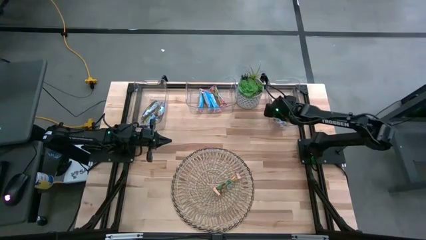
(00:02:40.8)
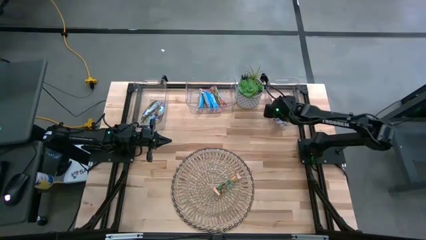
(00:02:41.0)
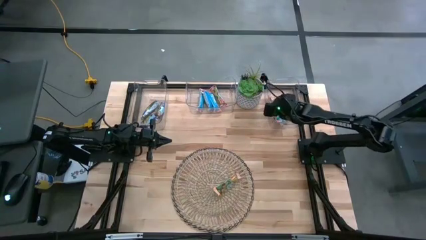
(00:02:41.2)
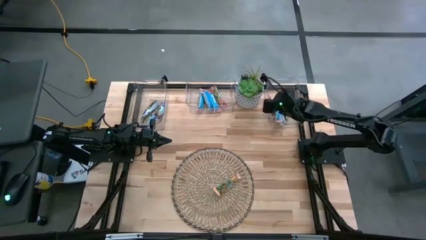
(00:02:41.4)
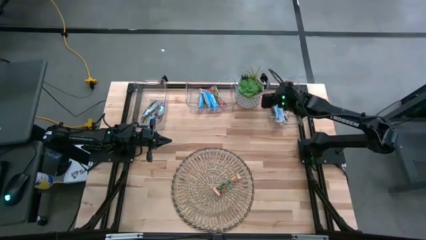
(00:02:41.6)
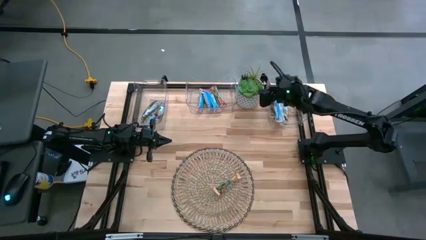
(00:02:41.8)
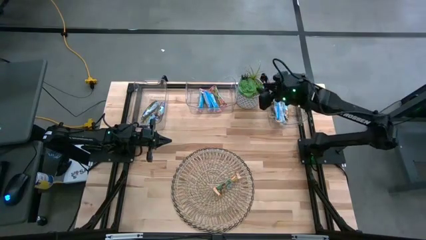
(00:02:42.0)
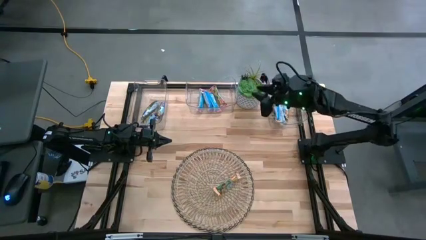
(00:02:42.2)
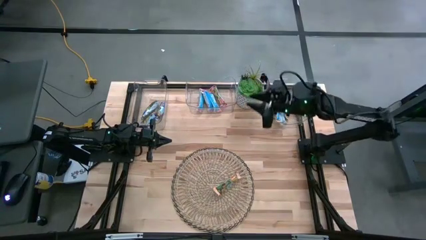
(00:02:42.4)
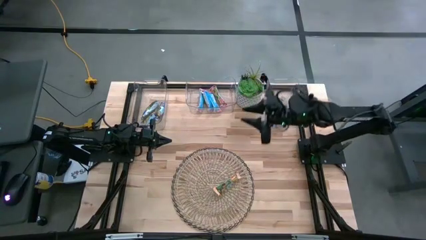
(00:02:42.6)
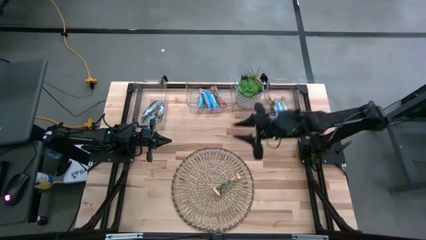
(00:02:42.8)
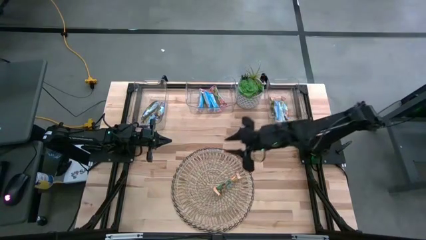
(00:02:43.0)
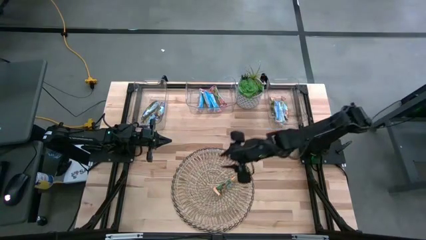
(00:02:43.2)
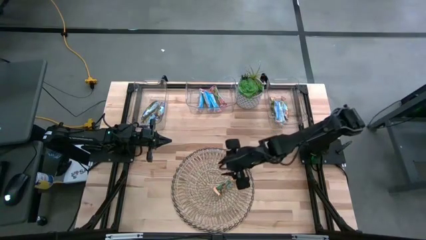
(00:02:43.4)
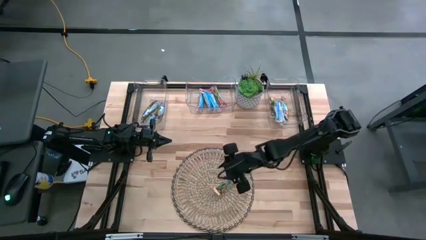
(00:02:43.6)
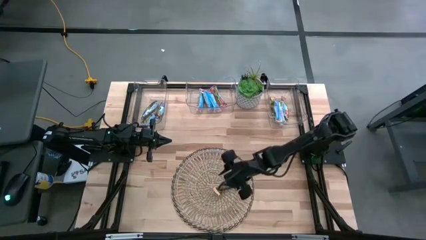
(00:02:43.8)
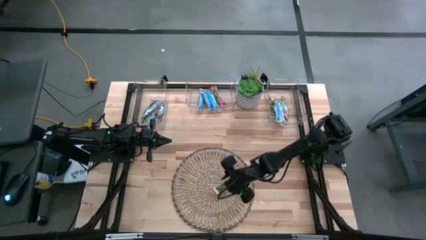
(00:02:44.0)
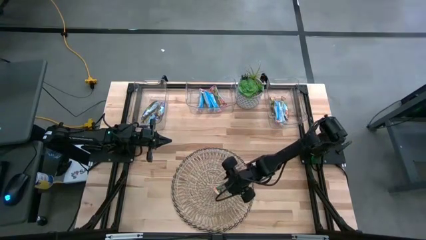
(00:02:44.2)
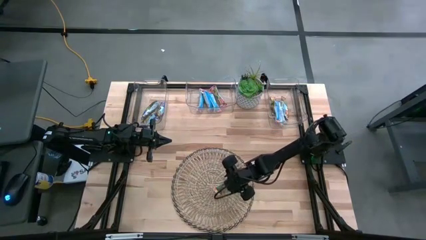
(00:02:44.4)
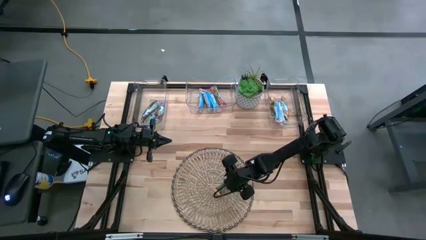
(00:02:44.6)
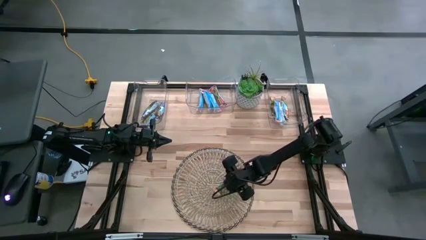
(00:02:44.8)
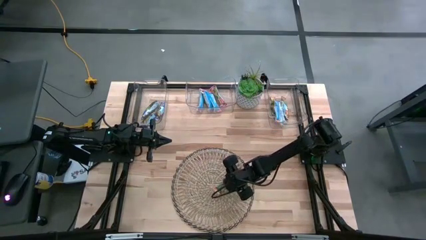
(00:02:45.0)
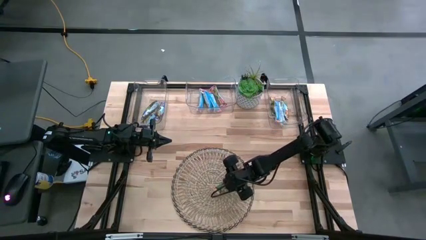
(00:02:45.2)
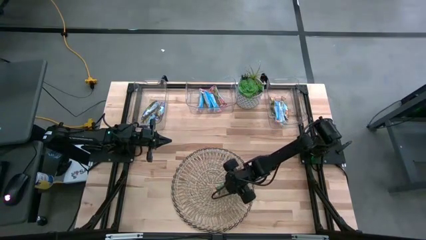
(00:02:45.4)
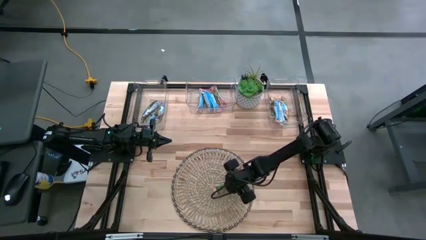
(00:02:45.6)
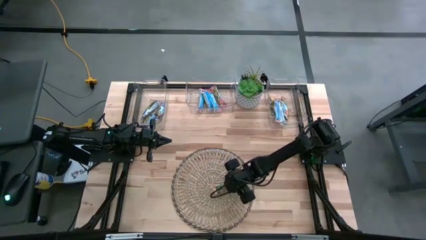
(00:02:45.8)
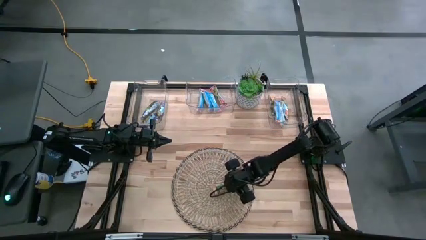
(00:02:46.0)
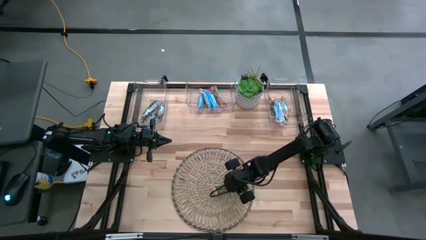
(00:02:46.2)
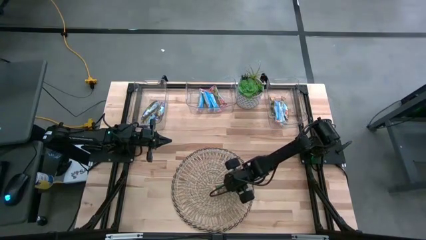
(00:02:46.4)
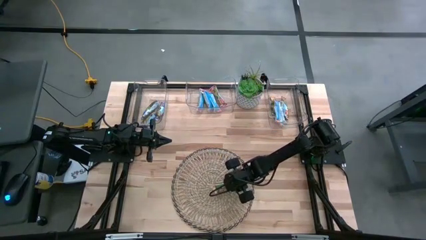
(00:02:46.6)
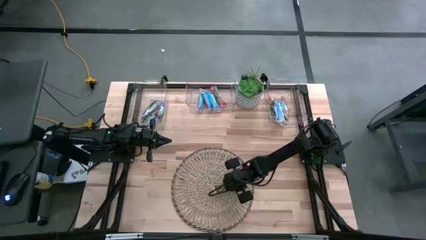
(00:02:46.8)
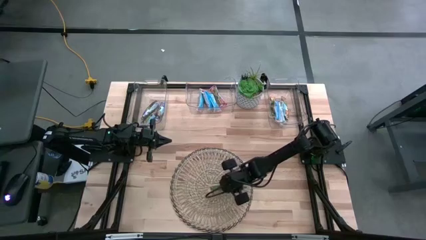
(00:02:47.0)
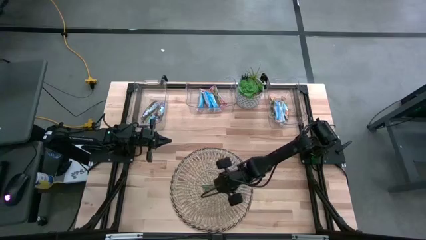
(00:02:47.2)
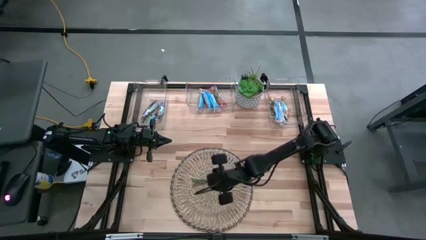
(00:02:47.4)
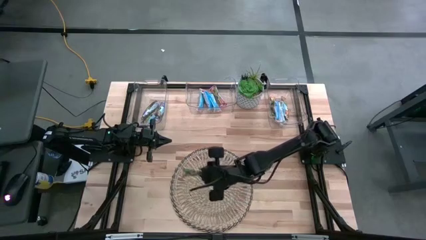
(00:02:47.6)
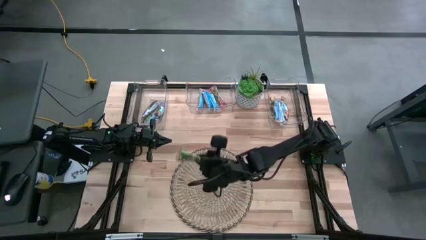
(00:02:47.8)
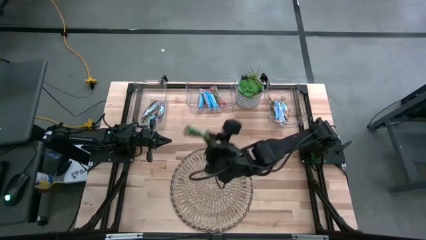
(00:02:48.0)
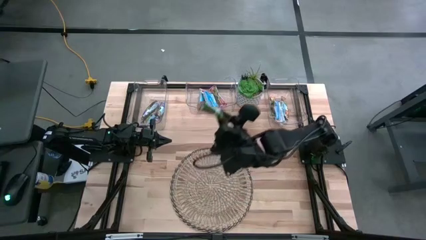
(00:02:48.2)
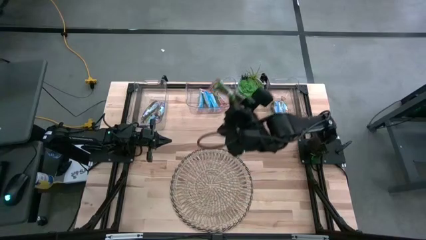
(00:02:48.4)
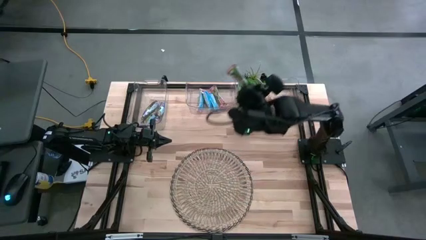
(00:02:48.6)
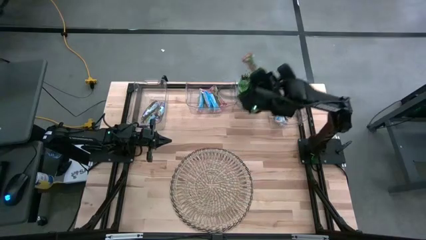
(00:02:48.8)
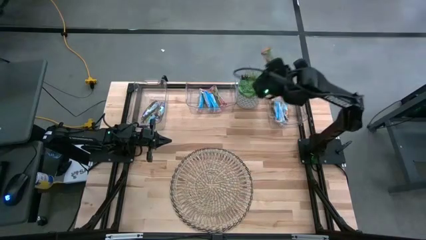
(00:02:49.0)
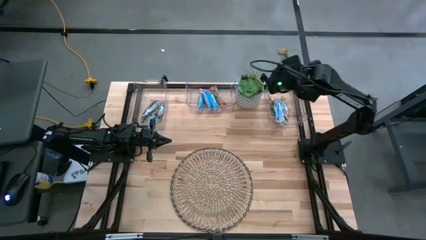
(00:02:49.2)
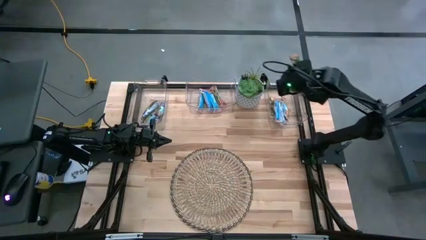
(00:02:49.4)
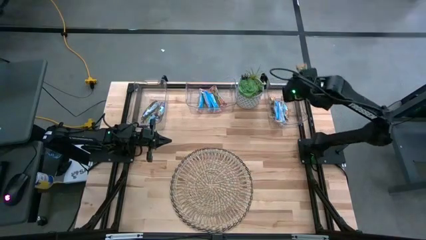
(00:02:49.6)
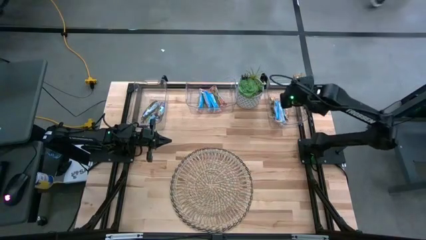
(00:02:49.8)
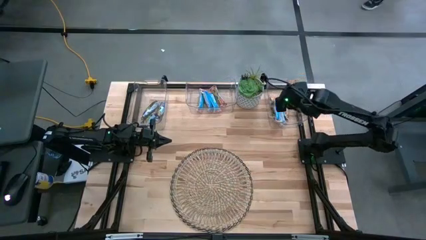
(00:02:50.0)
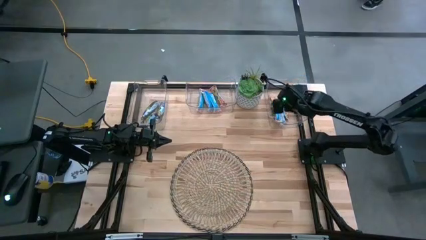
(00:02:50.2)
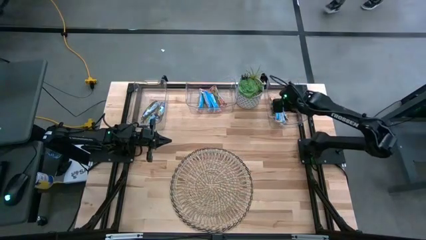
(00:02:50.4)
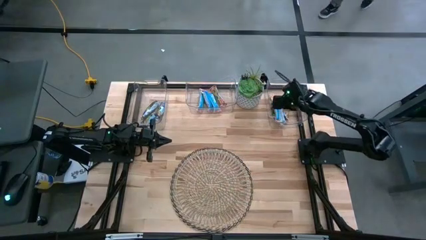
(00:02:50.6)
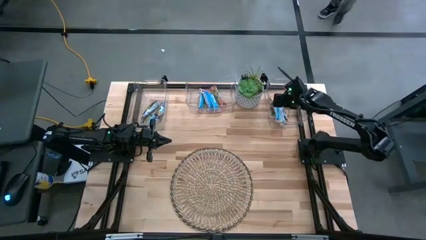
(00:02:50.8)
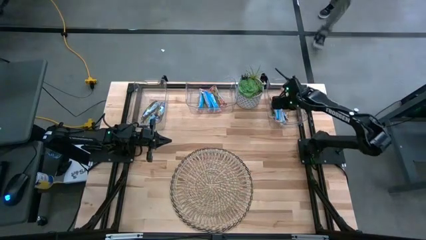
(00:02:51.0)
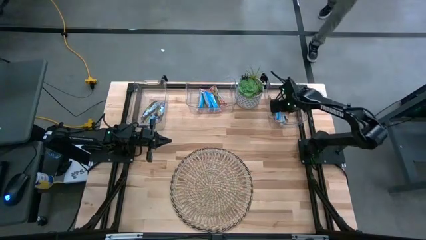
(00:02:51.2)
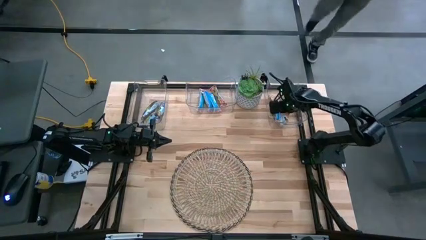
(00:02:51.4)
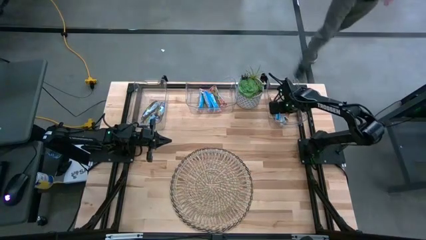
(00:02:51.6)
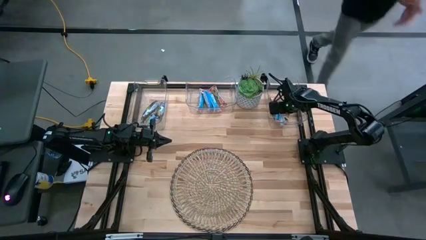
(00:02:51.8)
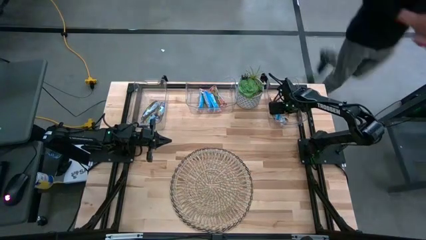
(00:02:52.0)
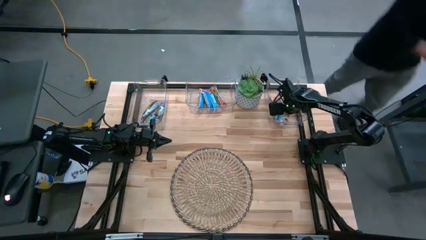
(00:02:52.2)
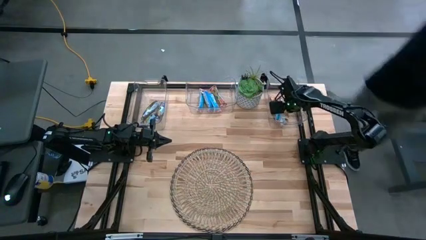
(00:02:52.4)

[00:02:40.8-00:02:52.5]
Task: Pick and place Granola Bars by type
Put the yellow granola bar into the right transparent bin

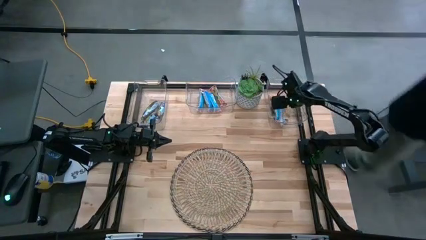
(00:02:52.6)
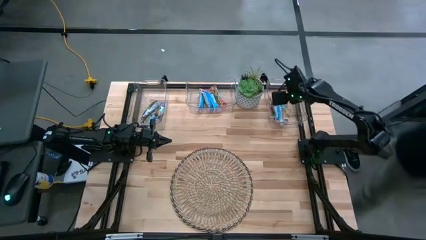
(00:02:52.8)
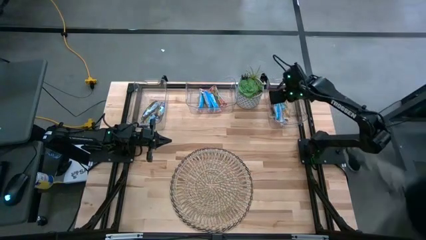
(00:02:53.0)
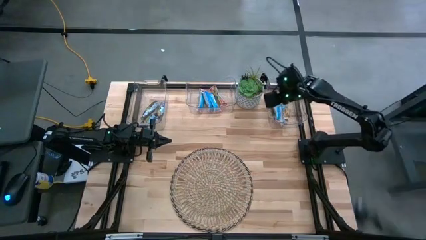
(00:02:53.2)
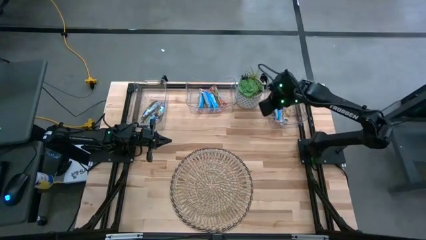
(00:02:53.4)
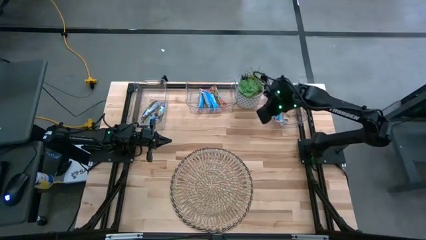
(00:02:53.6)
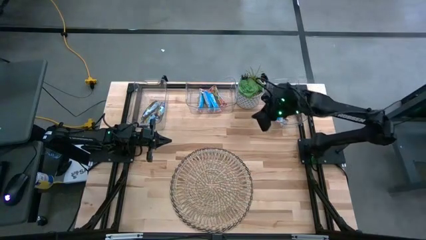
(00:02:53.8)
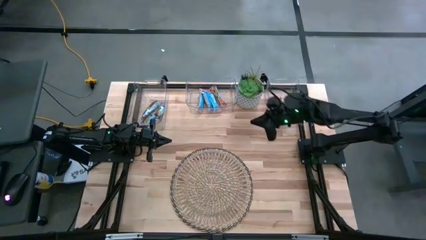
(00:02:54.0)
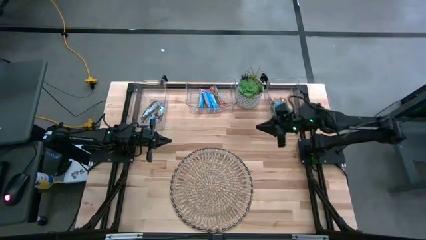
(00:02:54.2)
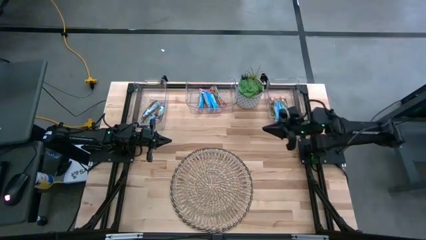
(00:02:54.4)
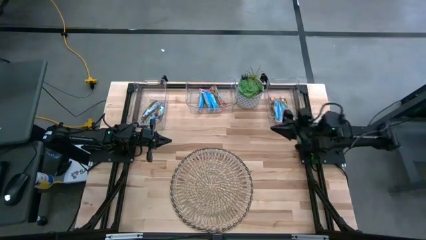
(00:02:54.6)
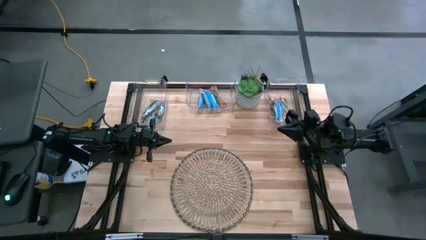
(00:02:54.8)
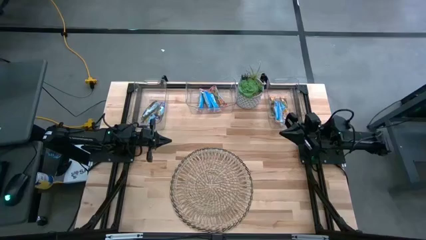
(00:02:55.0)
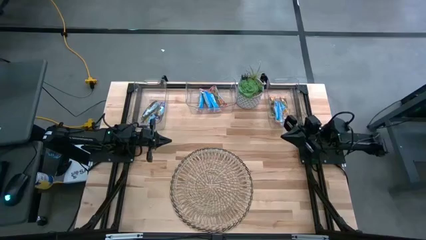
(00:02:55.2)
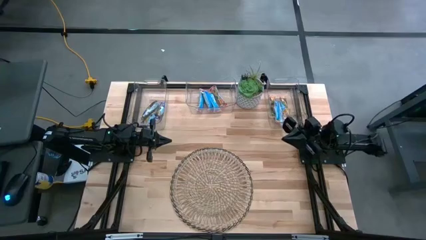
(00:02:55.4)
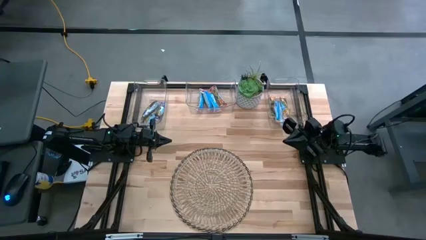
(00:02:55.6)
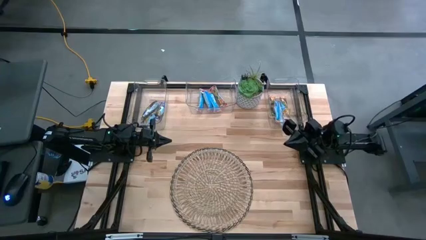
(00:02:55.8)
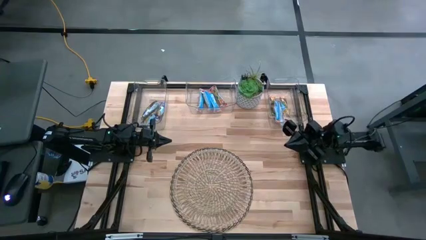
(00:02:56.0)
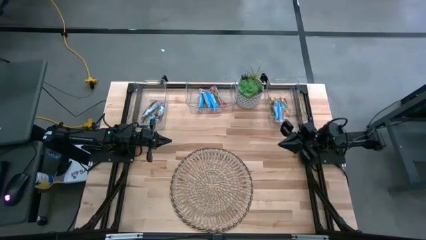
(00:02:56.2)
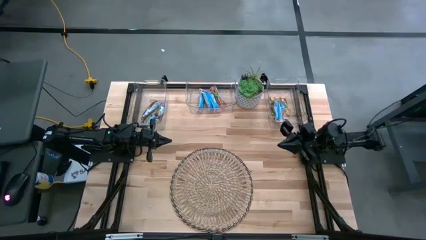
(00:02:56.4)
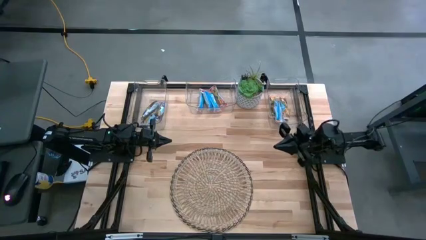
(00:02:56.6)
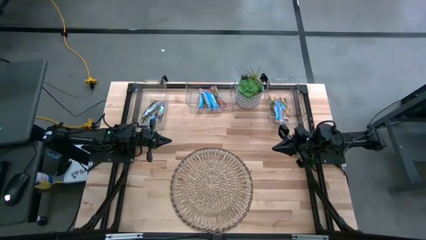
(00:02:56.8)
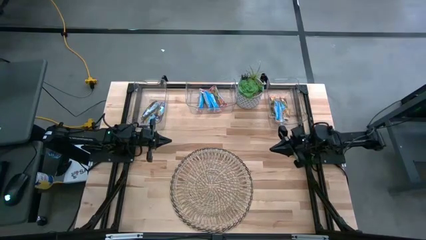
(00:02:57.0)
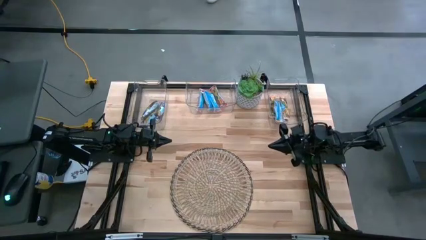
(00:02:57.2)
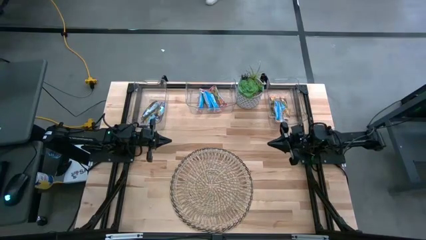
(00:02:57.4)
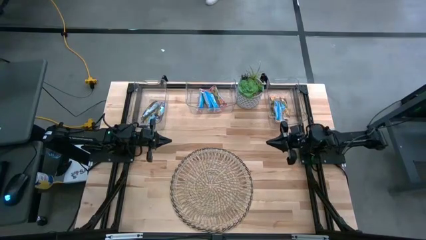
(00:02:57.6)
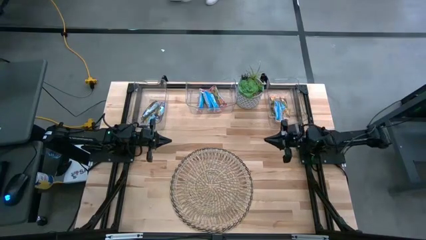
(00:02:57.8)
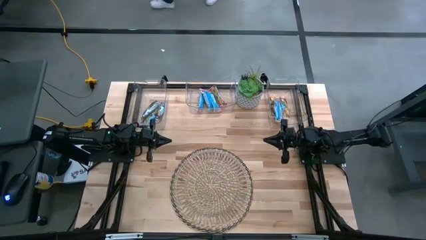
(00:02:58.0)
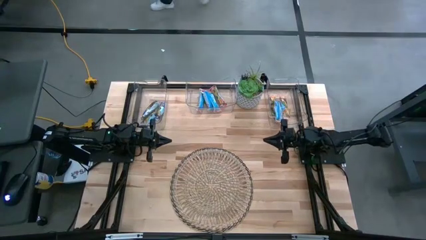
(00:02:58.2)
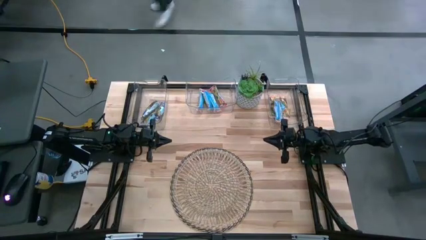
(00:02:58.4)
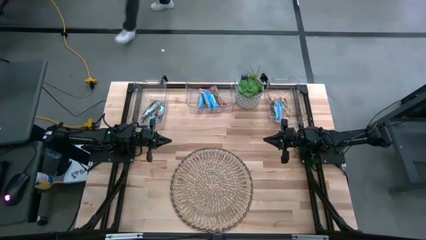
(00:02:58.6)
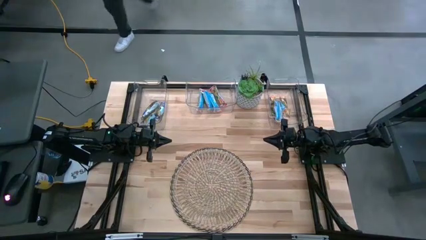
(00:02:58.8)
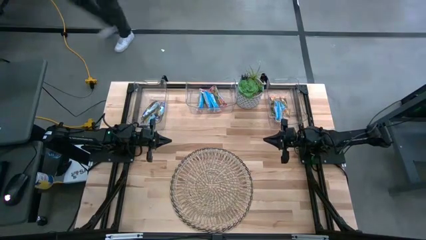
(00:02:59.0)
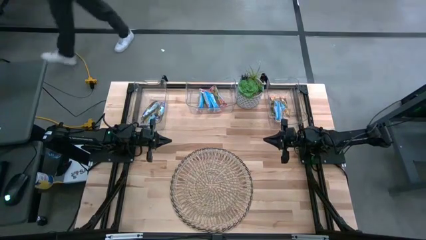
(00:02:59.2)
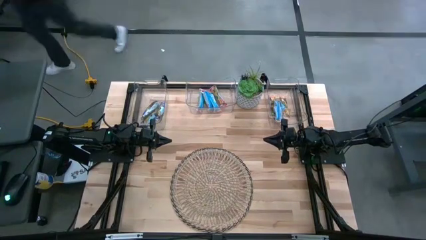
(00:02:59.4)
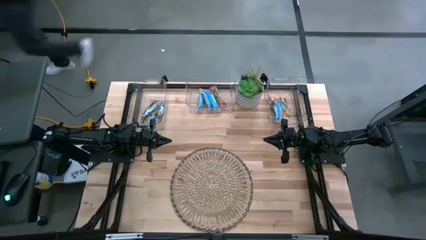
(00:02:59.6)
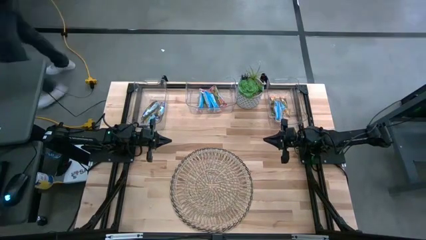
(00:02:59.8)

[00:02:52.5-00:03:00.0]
Return to home position
